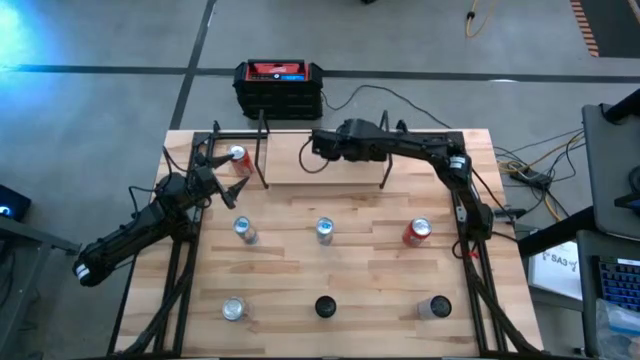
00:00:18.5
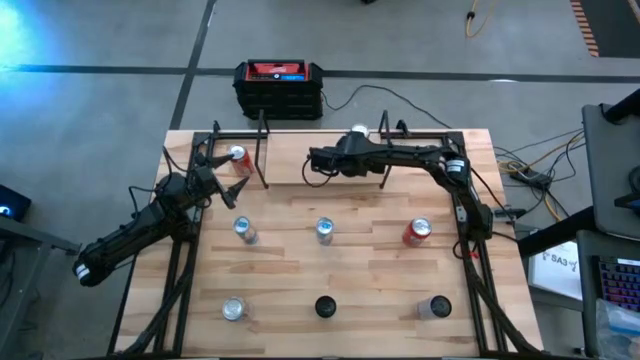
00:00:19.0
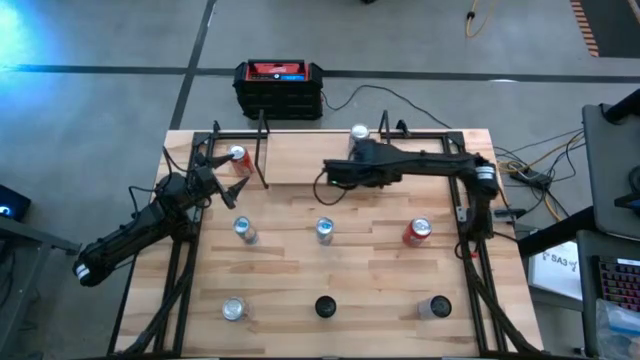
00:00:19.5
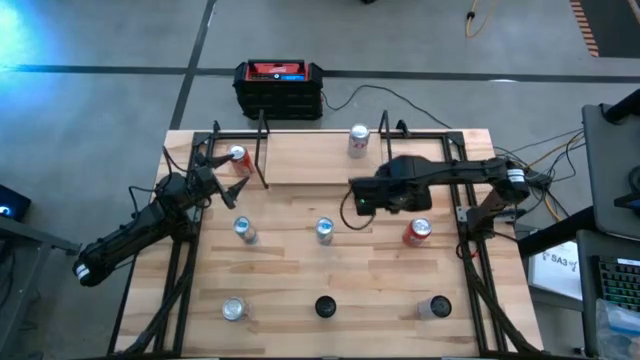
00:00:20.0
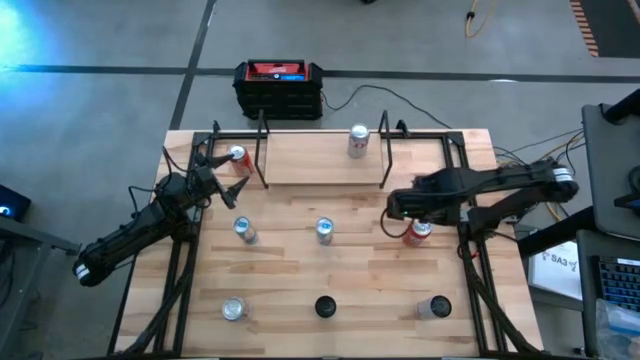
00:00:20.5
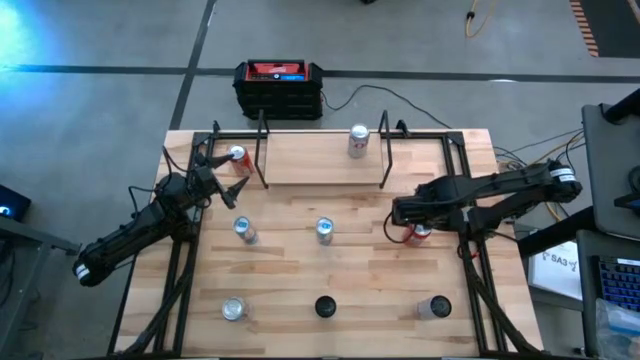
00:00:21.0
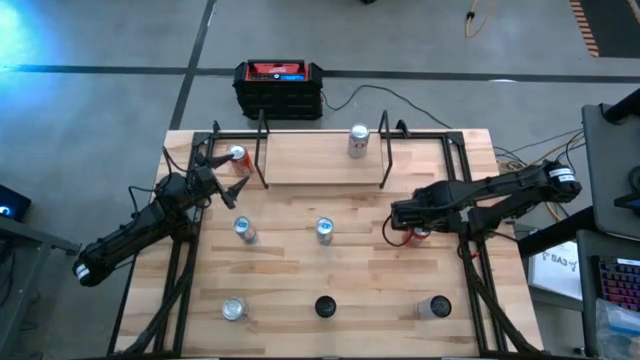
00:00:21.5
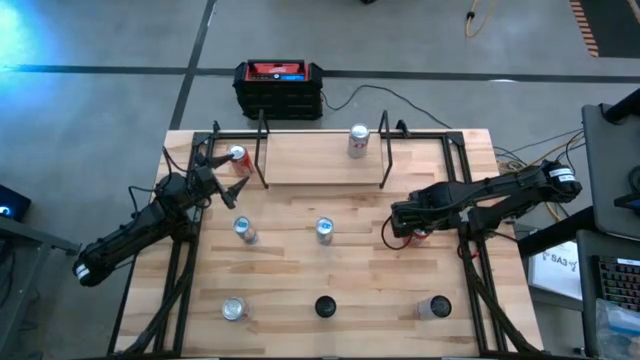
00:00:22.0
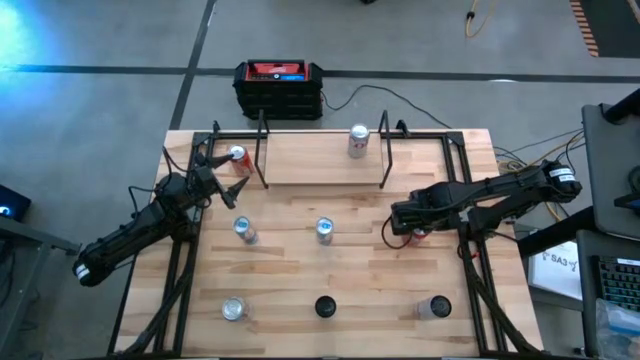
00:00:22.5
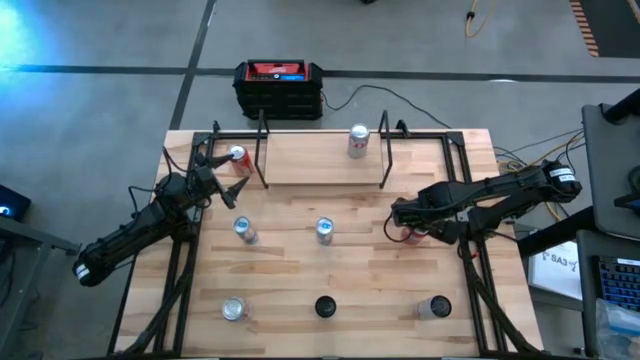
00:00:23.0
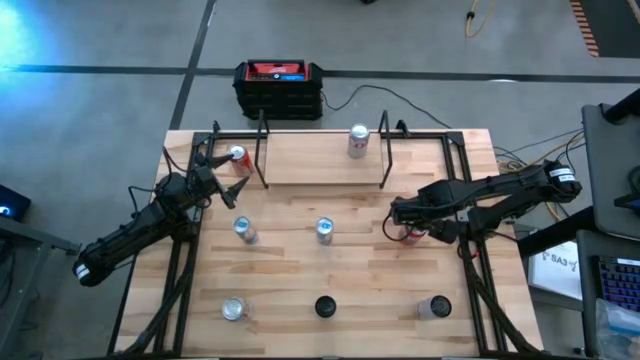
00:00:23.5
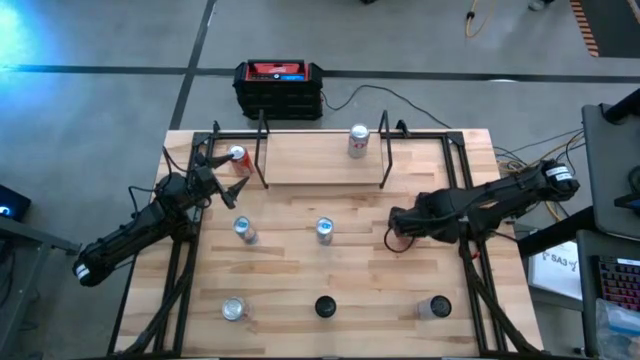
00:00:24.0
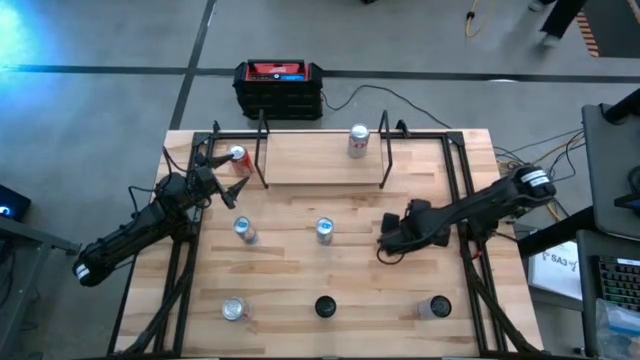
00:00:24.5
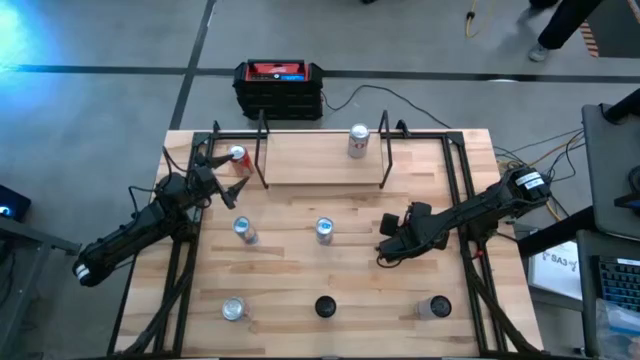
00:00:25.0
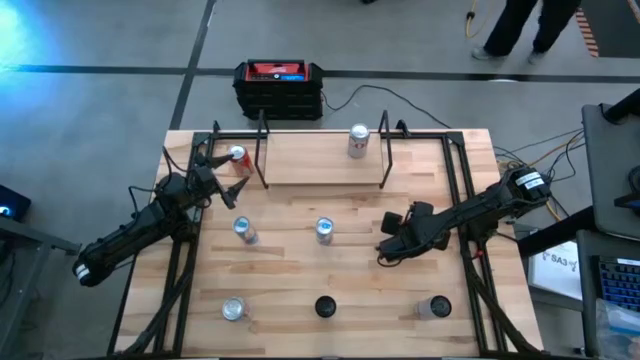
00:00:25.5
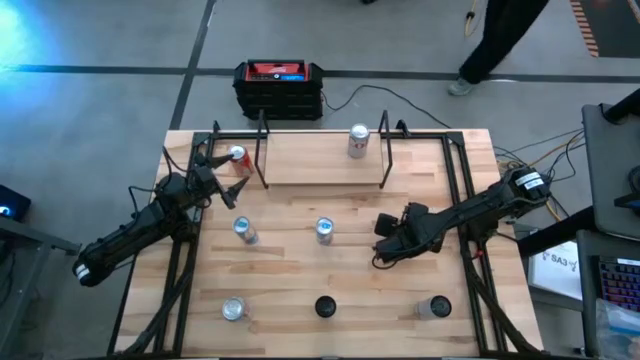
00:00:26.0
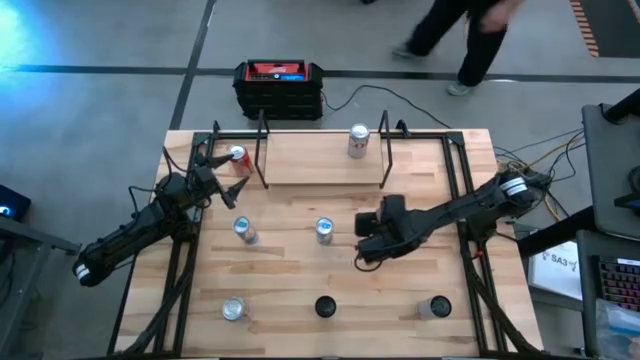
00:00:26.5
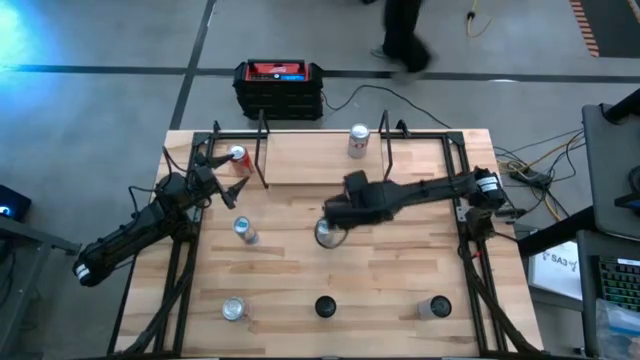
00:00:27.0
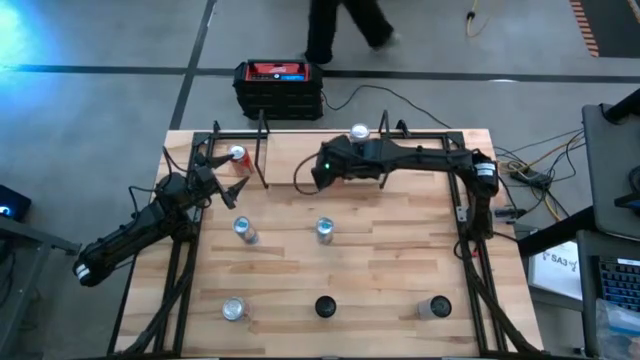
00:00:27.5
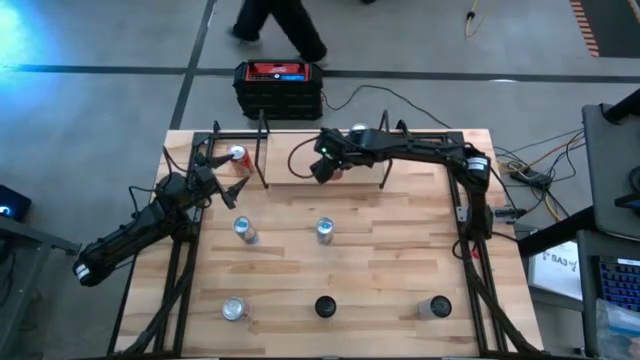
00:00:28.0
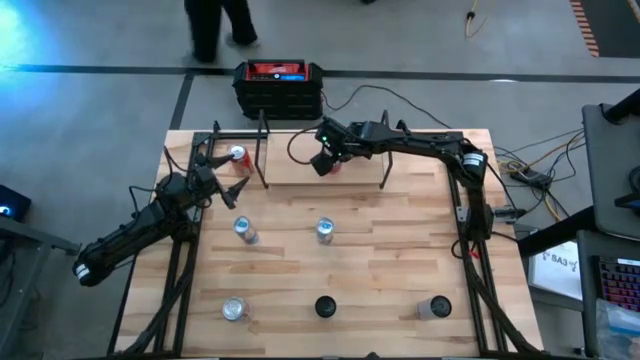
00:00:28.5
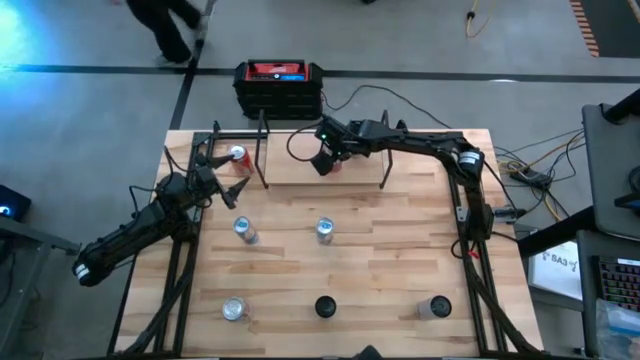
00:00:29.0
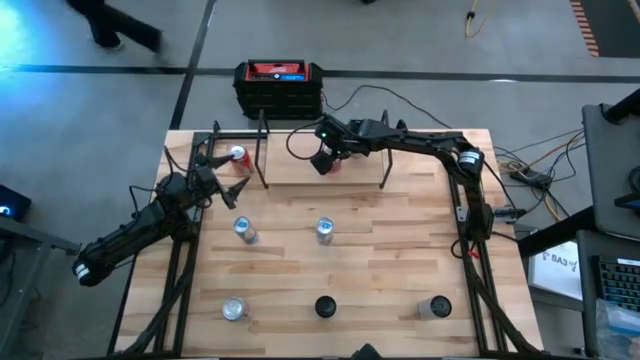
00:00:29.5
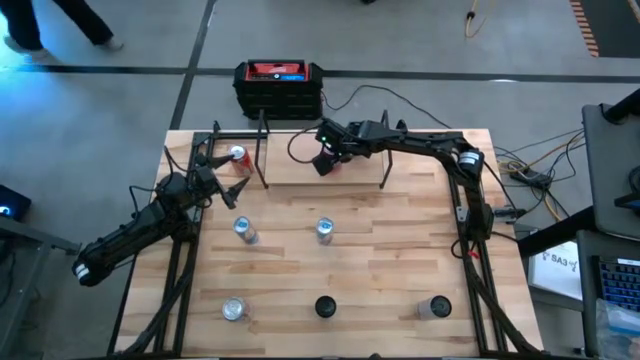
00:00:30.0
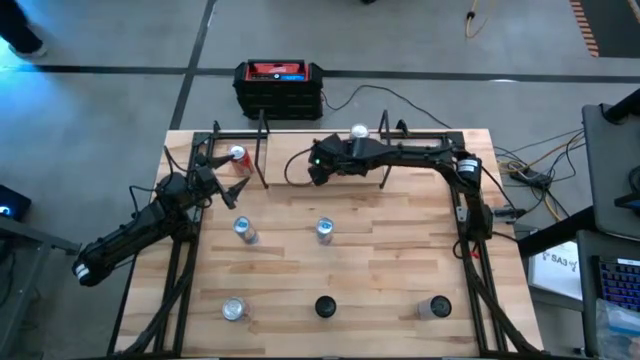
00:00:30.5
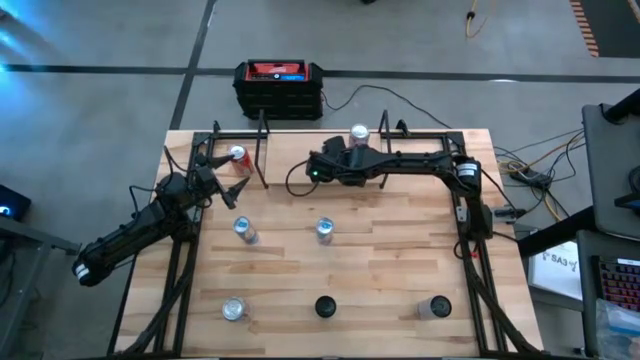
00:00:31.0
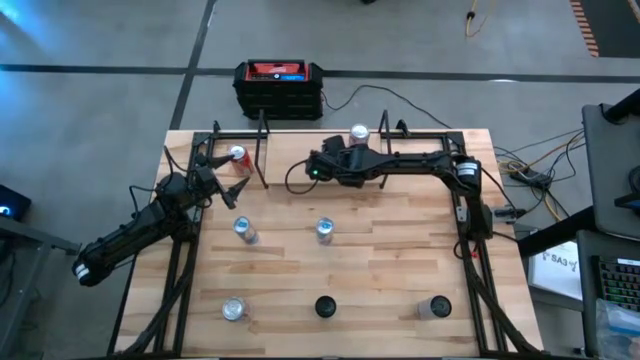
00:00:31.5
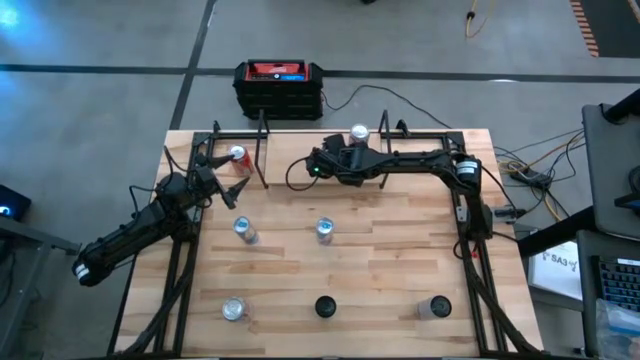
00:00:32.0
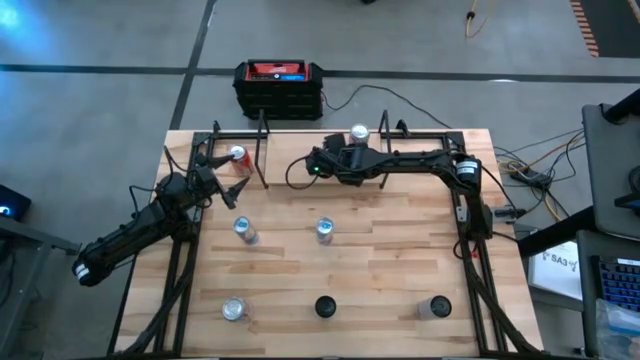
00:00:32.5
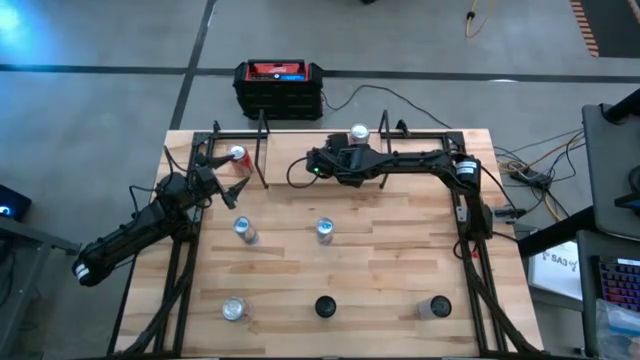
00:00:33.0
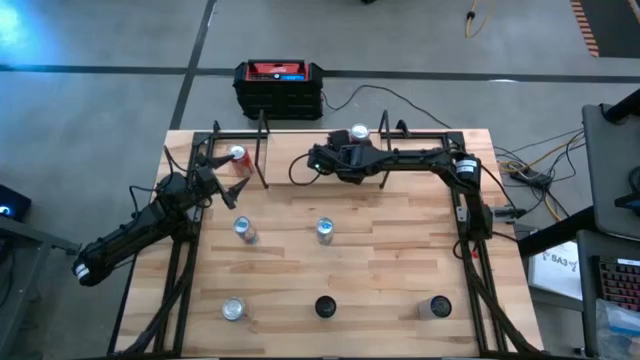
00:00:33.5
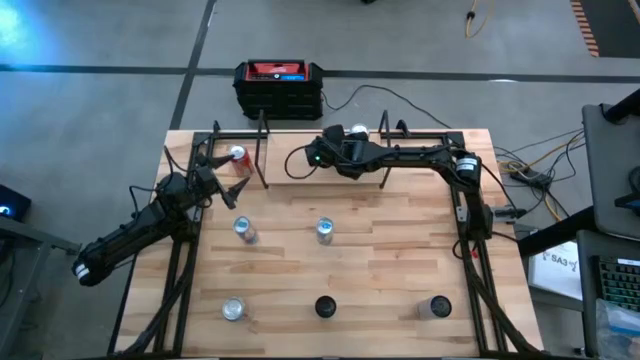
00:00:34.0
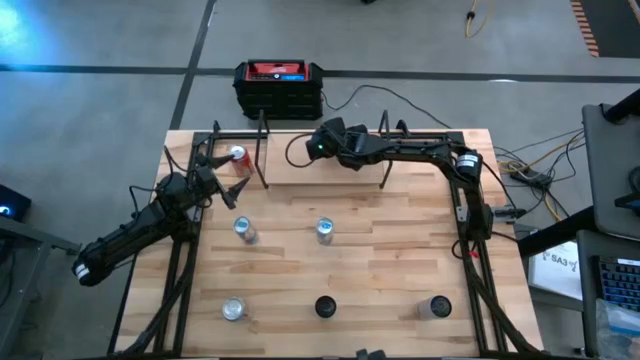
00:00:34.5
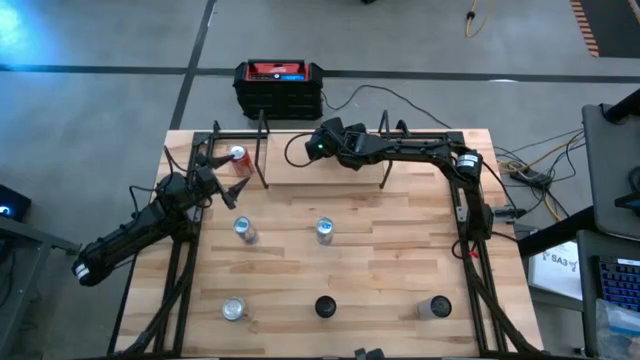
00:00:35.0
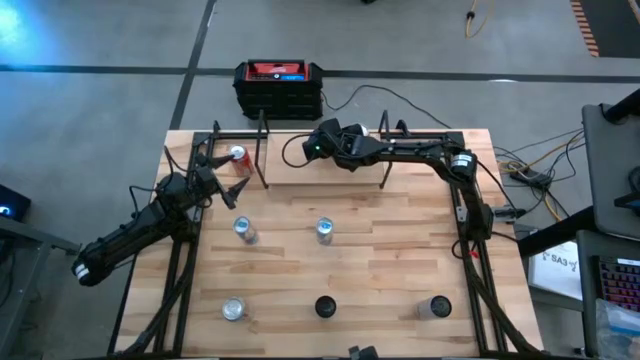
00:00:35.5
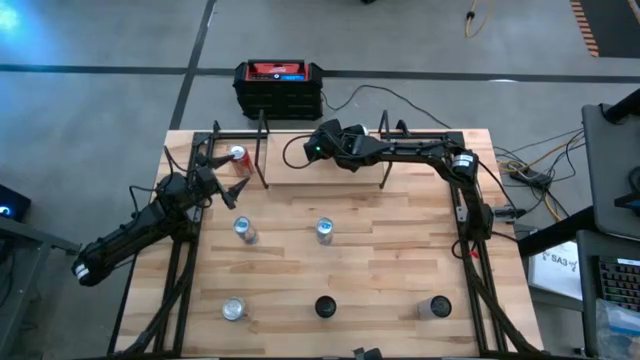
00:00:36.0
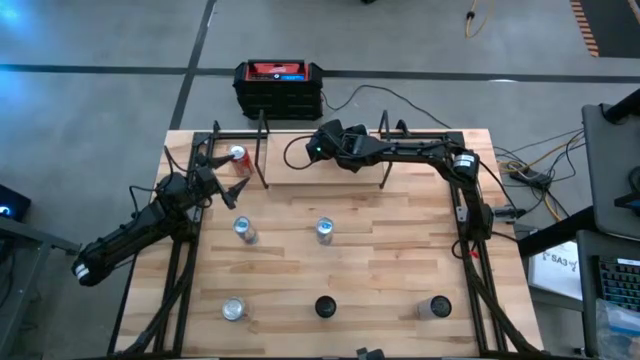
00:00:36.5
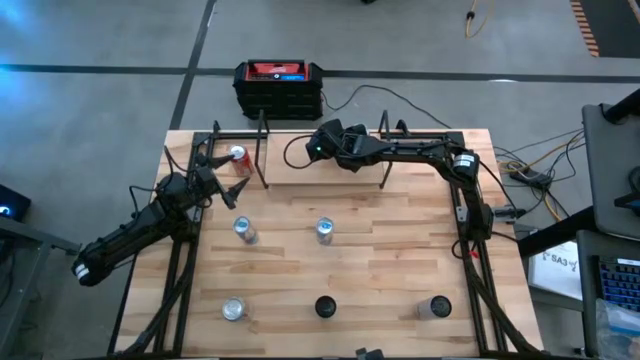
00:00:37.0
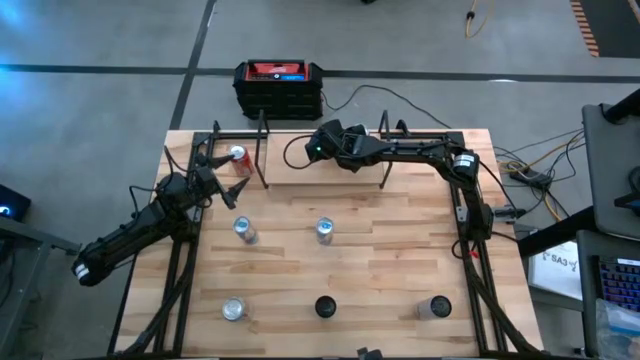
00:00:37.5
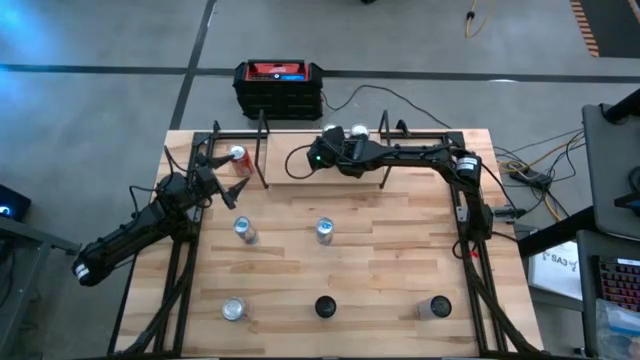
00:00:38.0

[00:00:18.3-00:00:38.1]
Task: Place canned beverage on shelf
Put the bottom red soda can on the shelf
